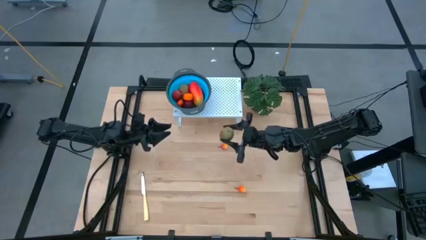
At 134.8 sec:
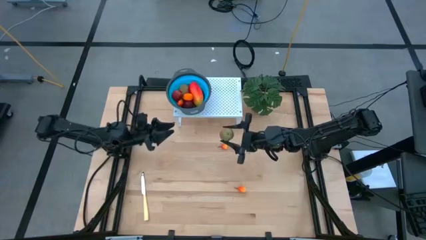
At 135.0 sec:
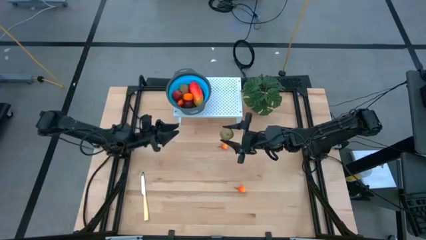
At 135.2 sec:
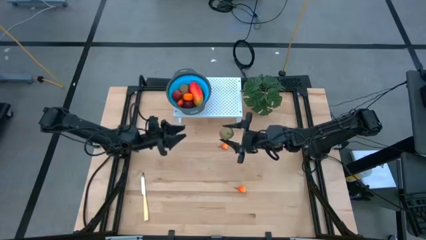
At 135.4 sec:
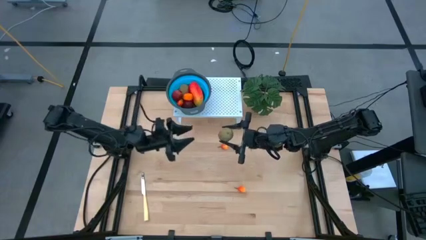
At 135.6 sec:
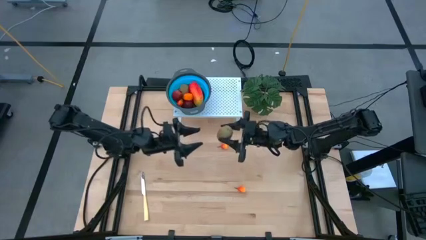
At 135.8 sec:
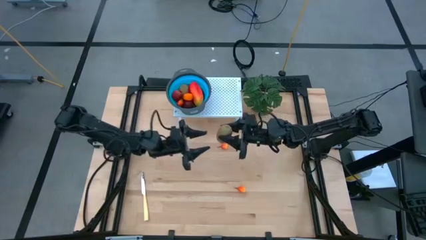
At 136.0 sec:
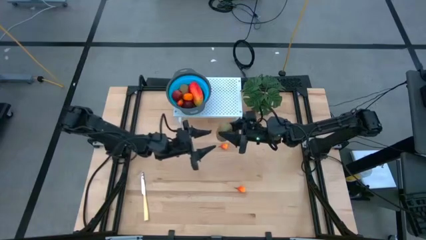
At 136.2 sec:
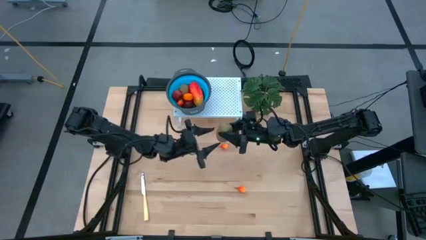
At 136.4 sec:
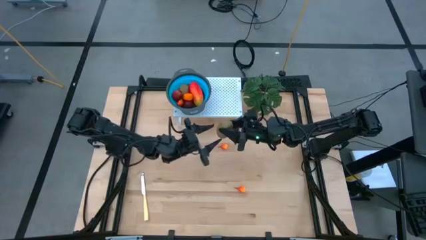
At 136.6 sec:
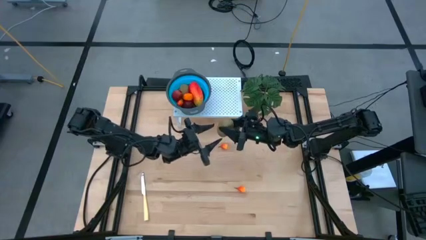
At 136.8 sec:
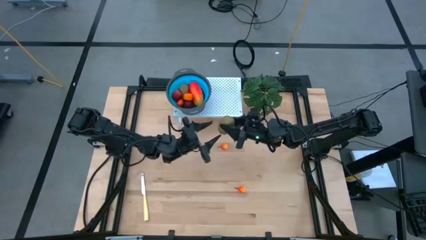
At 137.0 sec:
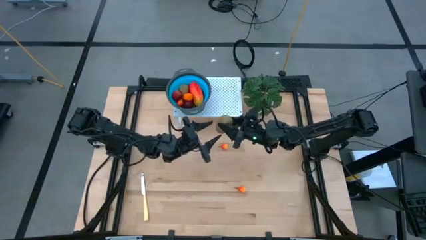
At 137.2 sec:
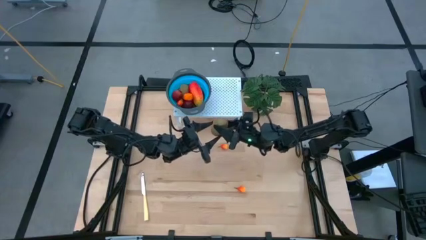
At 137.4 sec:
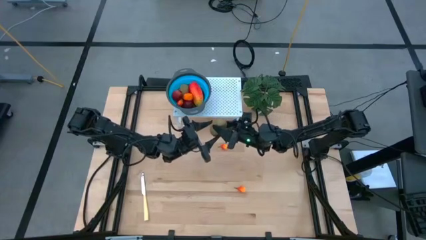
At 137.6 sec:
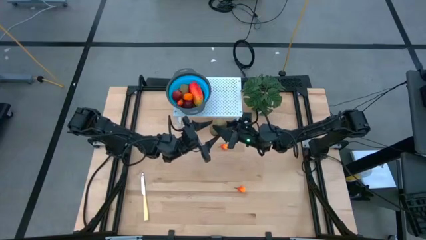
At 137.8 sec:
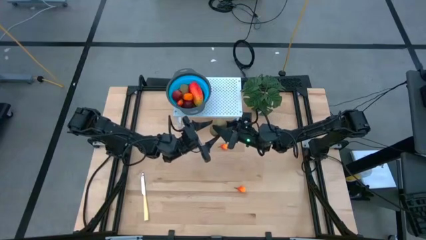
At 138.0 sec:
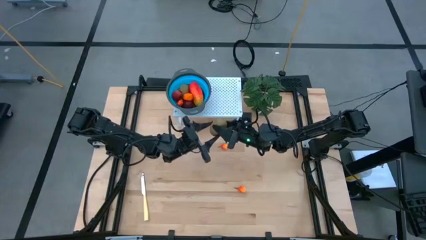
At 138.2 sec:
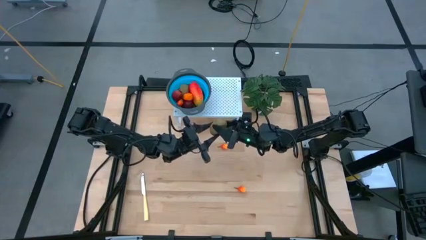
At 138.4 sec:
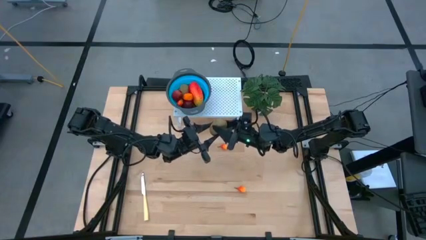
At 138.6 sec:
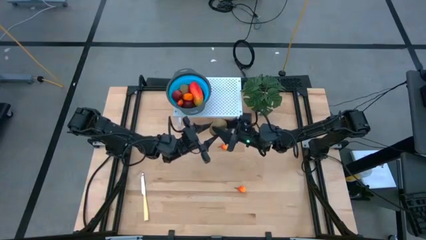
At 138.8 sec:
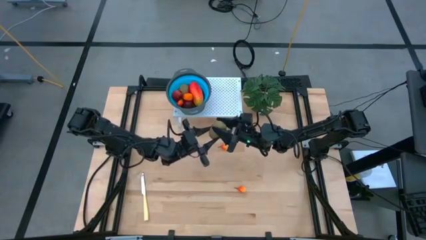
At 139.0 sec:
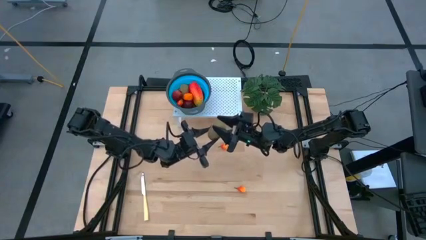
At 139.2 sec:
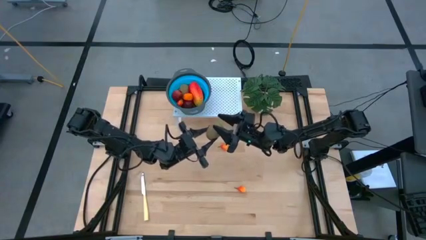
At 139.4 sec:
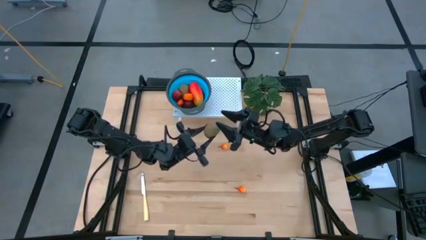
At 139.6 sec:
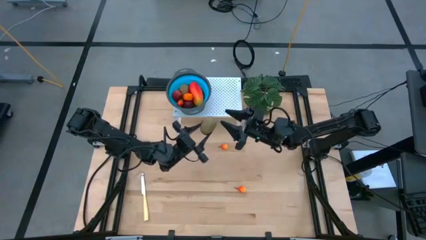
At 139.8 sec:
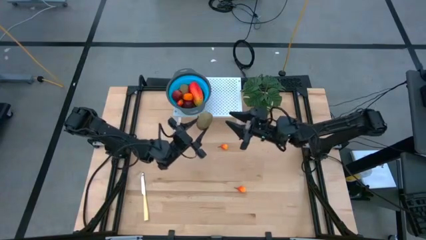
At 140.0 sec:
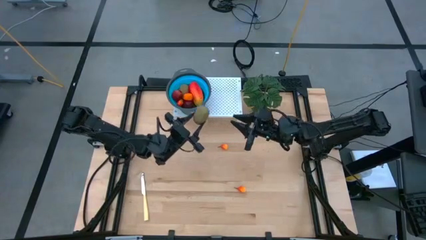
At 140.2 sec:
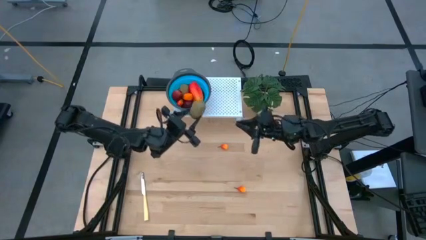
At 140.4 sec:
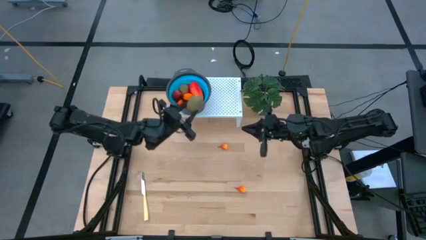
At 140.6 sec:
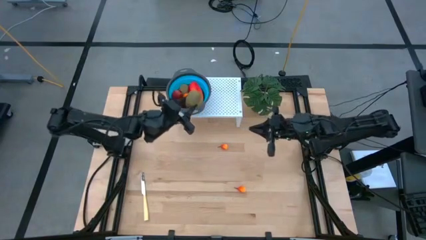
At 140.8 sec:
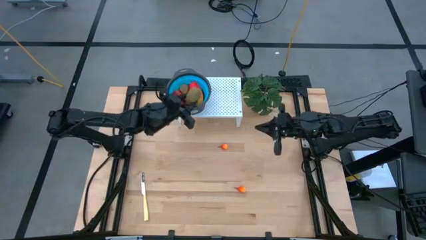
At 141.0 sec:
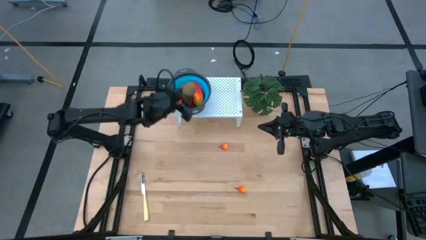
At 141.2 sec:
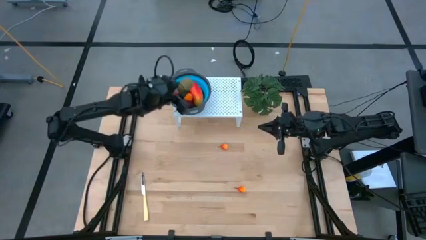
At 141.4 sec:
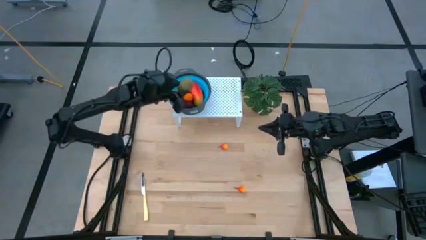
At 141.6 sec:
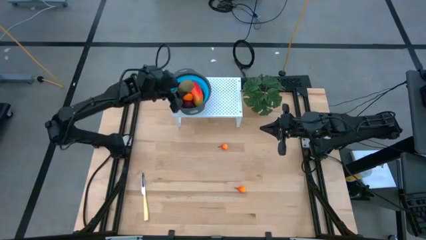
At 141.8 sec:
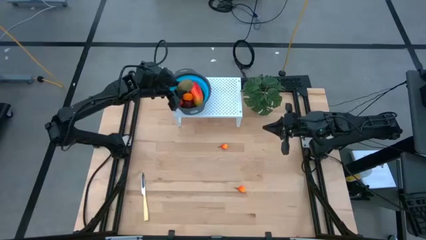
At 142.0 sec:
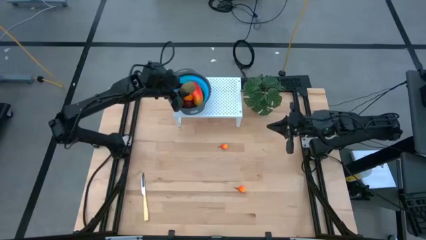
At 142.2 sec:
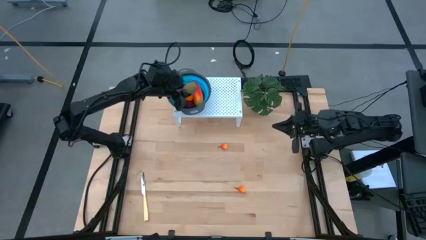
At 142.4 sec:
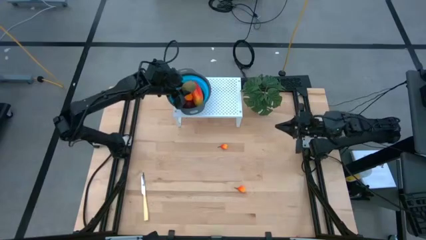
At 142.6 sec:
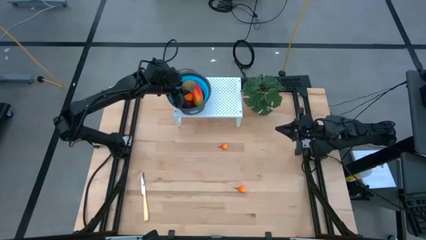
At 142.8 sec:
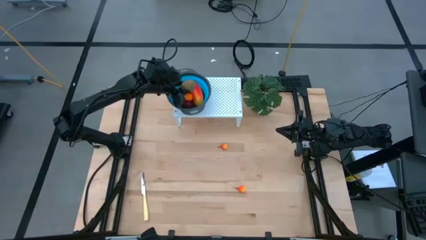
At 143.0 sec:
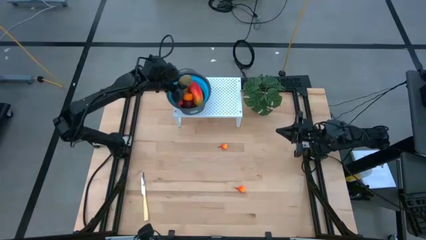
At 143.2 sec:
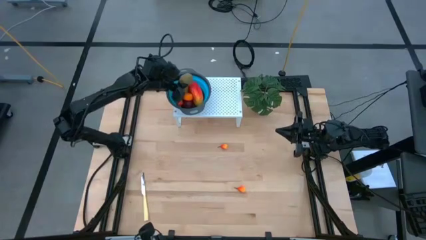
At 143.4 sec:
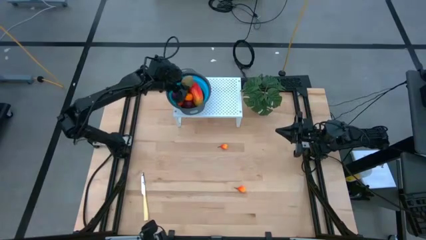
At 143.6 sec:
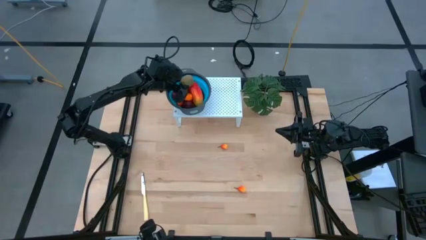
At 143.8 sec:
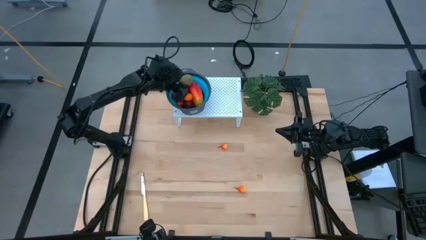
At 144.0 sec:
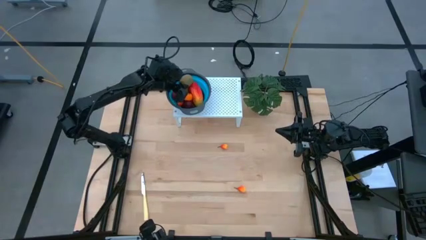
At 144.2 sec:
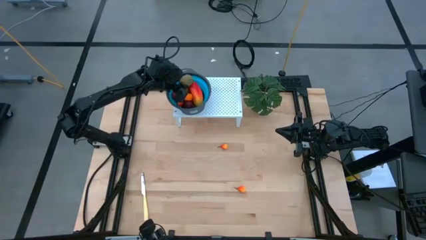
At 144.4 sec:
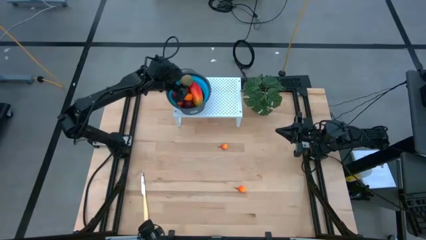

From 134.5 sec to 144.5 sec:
Task: Pick & Place Fruit
Put the kiwi in the blue strainer bowl on the shelf

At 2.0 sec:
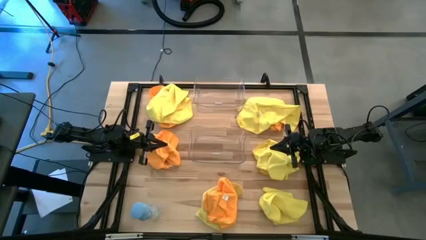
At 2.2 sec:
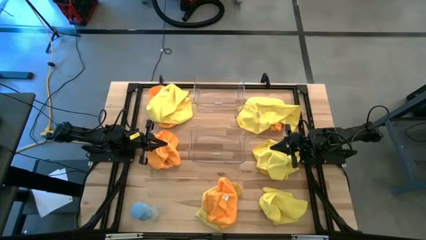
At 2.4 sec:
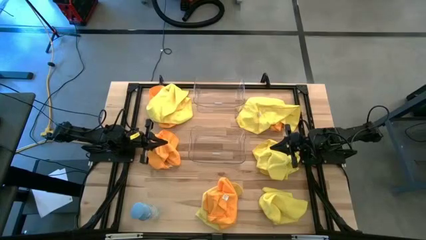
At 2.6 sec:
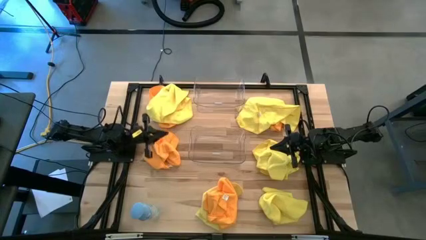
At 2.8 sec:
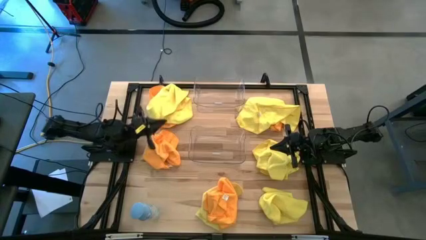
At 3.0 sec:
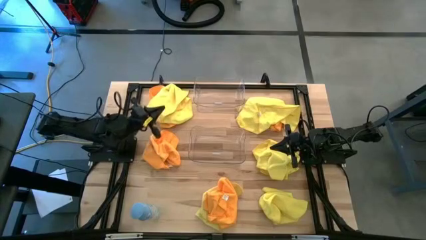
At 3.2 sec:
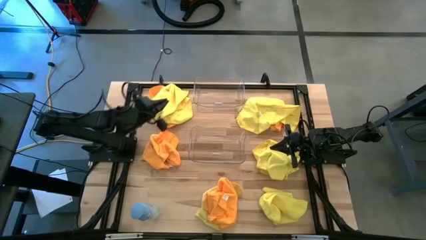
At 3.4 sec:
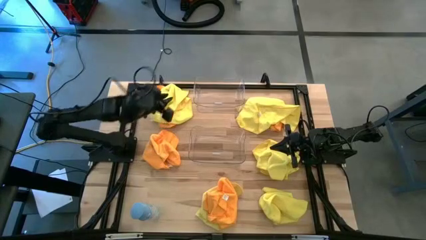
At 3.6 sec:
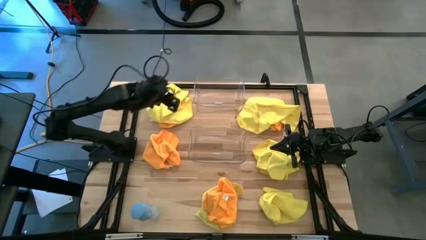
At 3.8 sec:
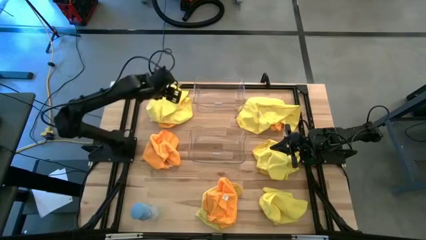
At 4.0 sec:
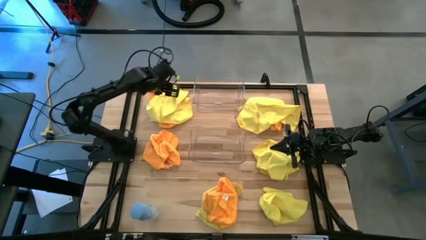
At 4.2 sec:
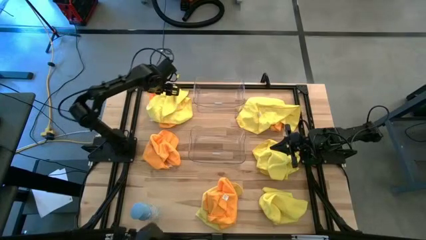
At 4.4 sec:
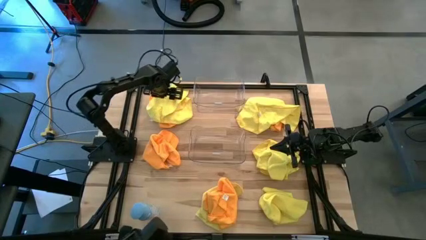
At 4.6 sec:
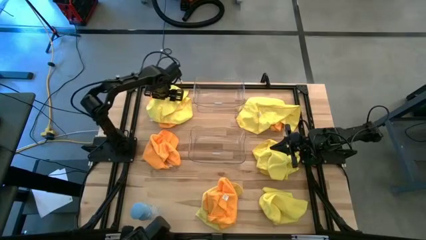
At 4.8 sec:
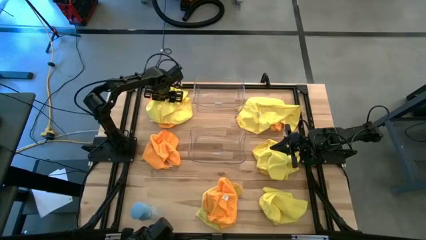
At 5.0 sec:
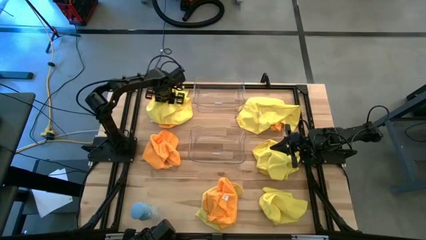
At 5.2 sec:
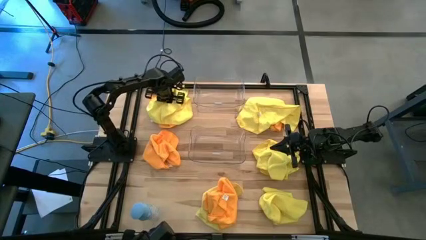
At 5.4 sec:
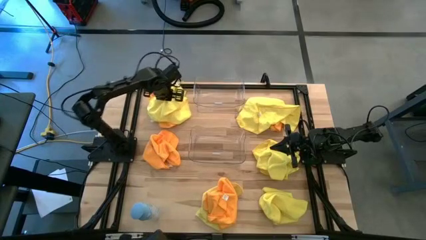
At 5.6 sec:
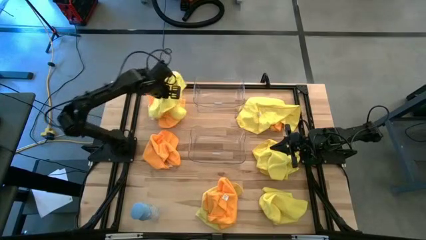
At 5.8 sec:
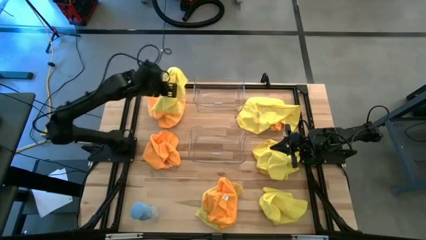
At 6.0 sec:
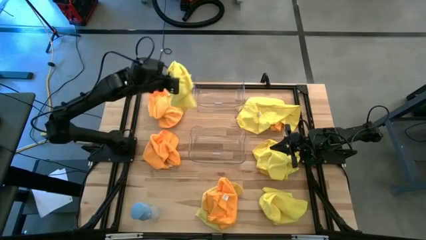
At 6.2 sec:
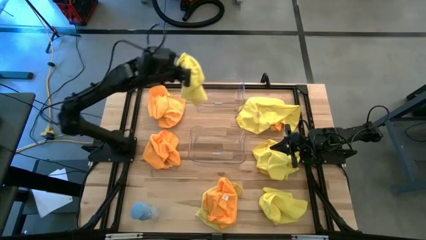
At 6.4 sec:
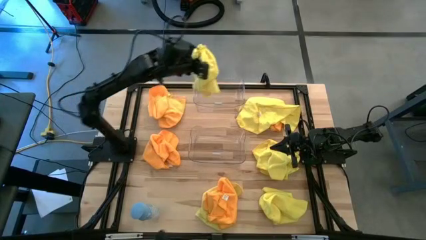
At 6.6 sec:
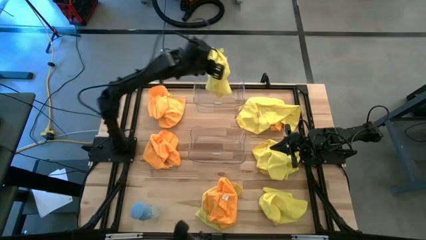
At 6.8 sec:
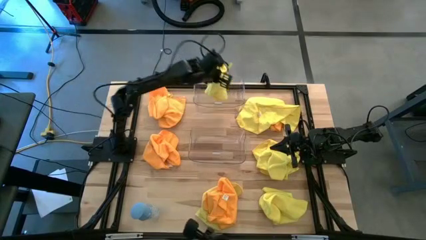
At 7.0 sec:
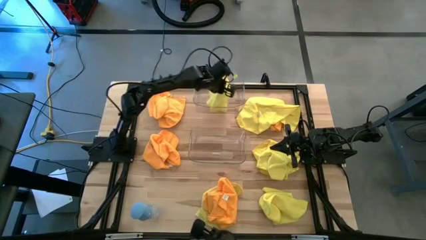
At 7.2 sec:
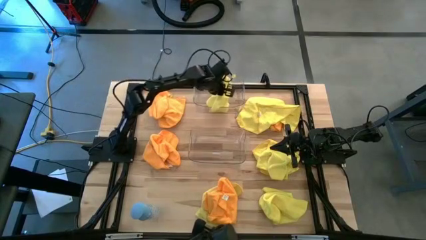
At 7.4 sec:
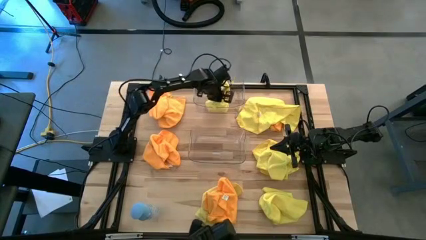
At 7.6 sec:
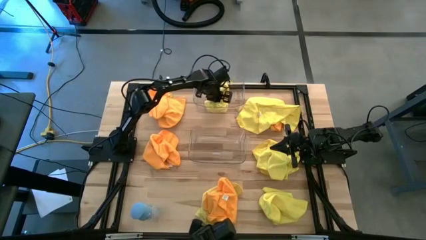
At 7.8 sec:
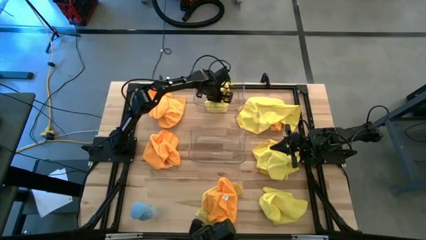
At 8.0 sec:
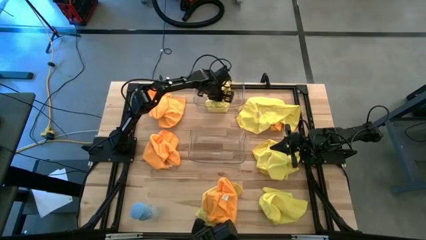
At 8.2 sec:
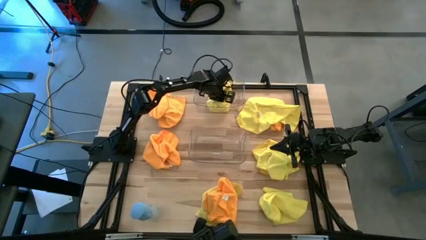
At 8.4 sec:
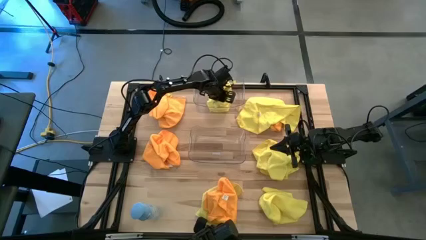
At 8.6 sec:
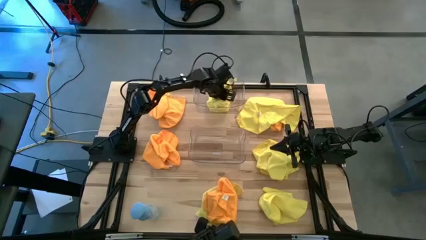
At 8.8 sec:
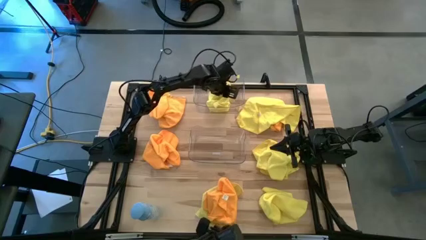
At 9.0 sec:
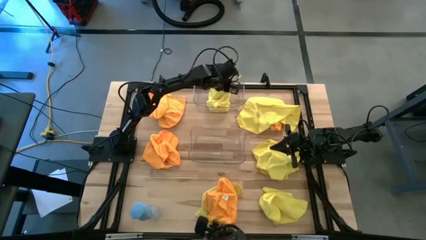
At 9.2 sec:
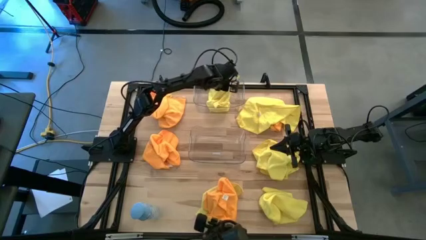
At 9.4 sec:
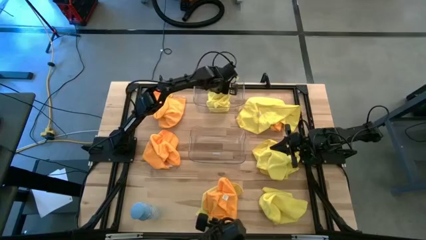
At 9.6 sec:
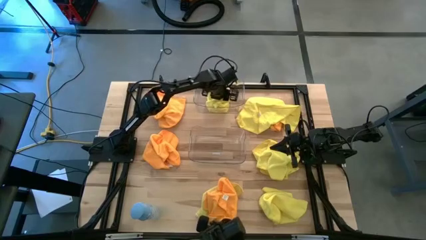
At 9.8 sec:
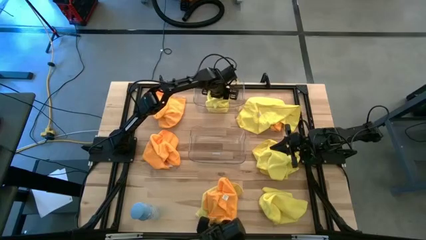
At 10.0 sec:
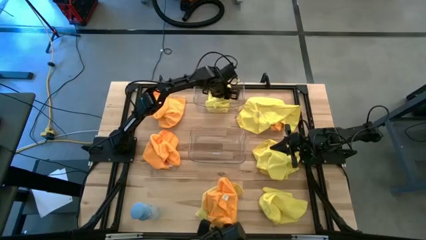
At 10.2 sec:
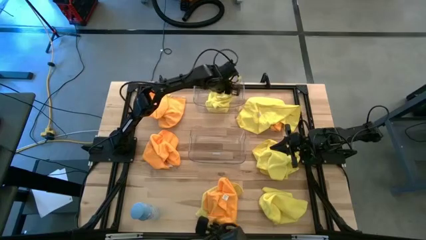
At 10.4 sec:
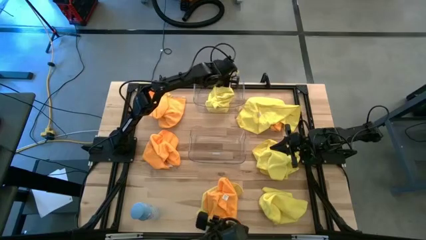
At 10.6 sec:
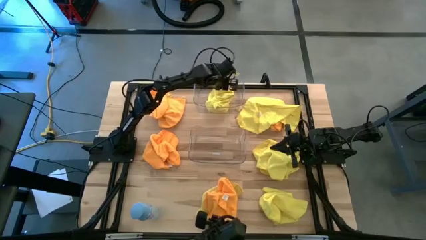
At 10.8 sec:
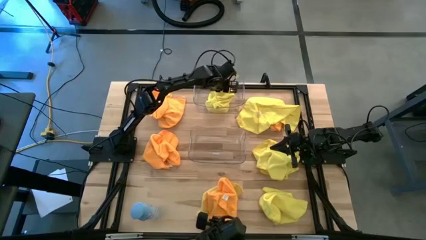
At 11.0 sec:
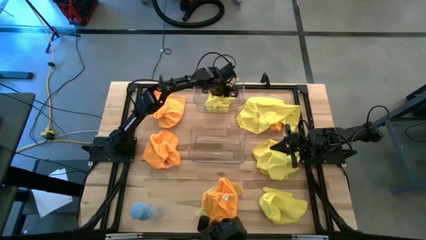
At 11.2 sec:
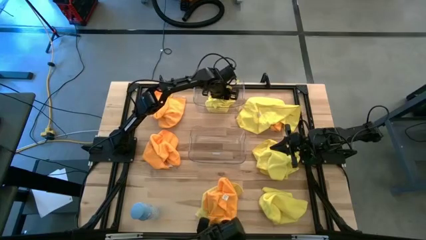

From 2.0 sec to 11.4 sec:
Task: Sort microfiber towel by color & place in baskets
Put the yellow microfiber towel into the top transparent bin
